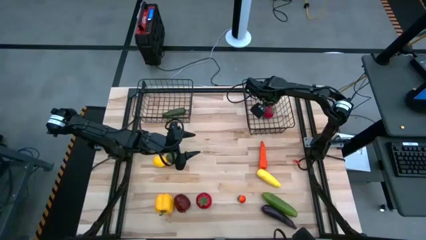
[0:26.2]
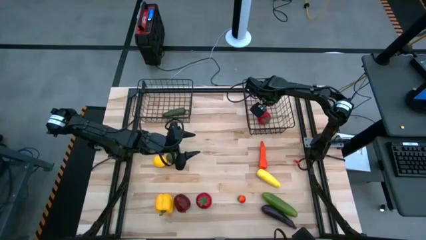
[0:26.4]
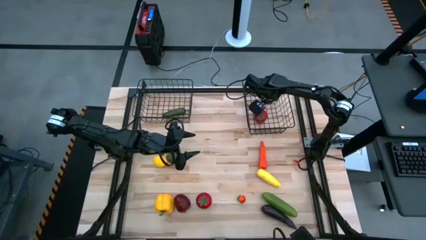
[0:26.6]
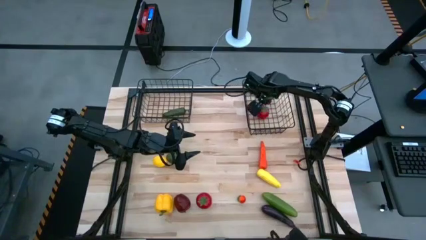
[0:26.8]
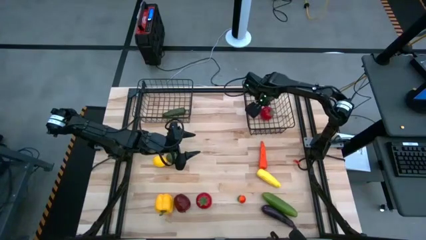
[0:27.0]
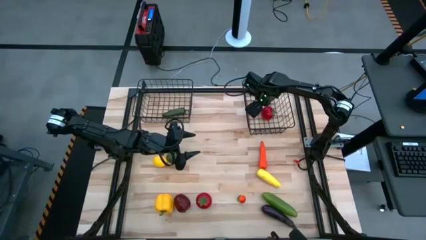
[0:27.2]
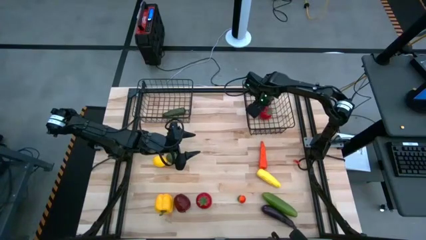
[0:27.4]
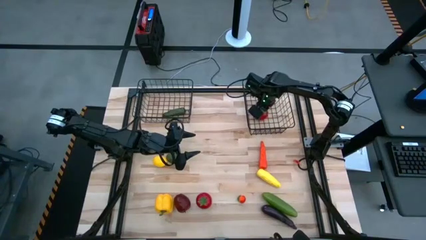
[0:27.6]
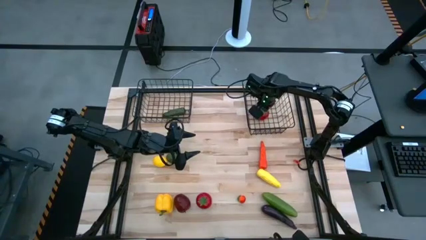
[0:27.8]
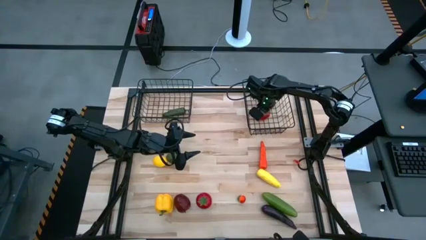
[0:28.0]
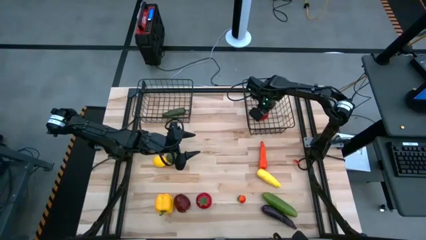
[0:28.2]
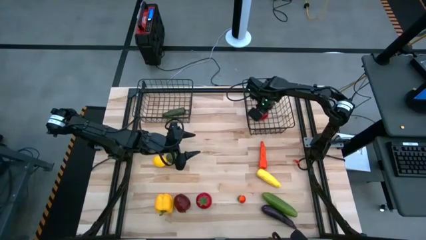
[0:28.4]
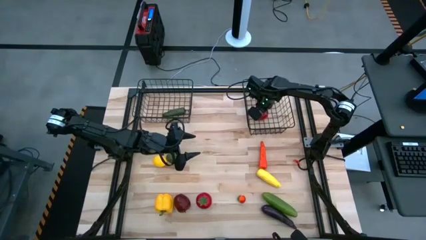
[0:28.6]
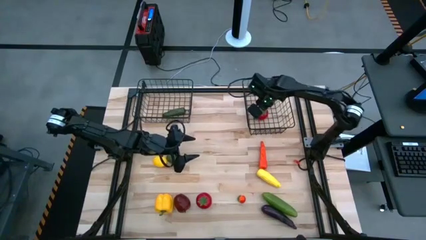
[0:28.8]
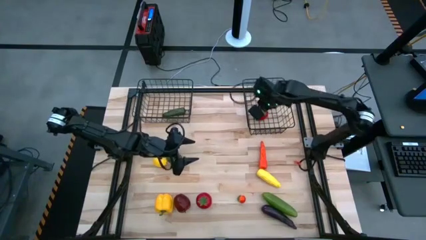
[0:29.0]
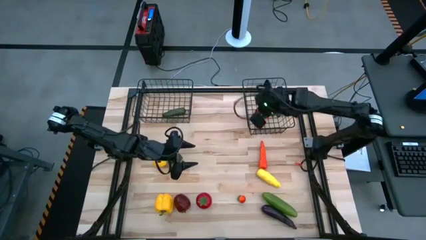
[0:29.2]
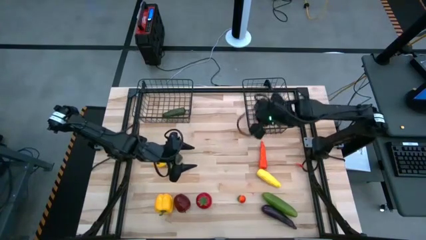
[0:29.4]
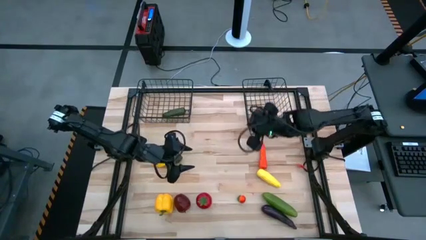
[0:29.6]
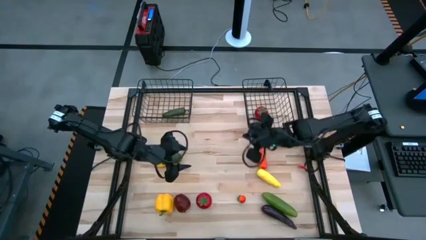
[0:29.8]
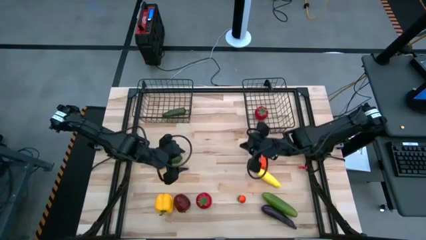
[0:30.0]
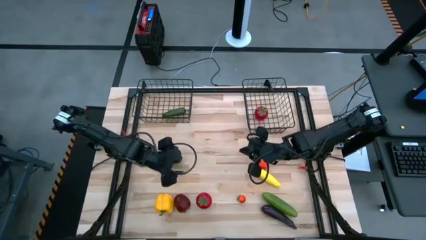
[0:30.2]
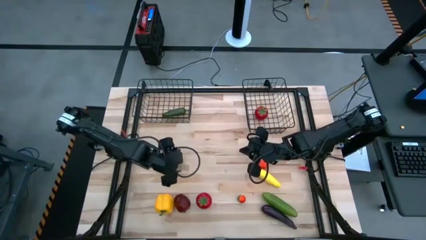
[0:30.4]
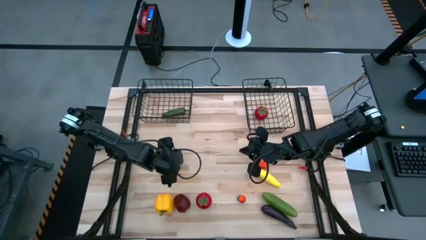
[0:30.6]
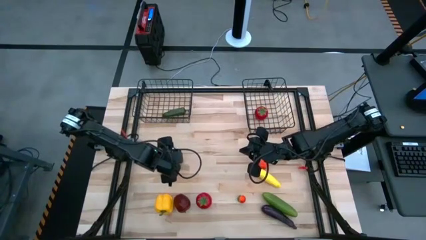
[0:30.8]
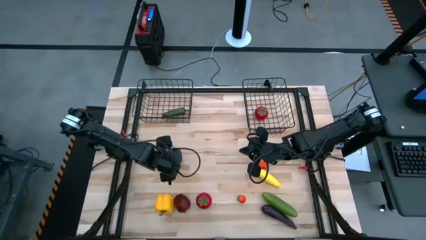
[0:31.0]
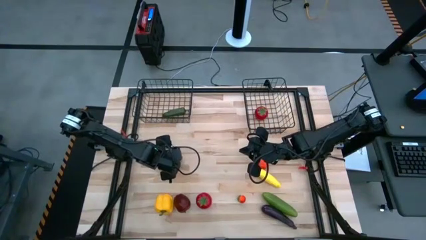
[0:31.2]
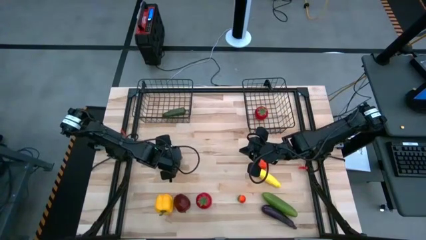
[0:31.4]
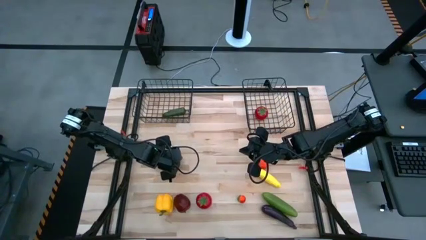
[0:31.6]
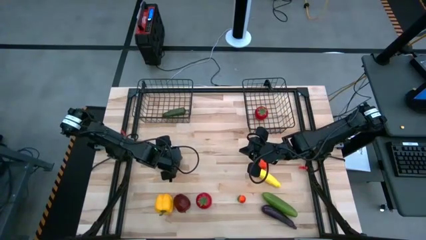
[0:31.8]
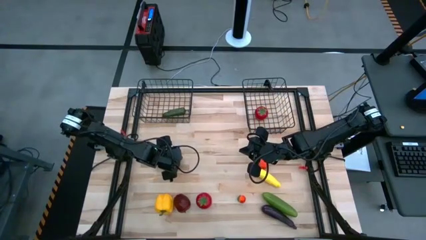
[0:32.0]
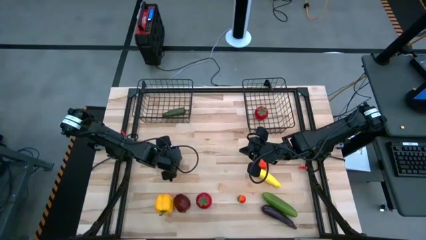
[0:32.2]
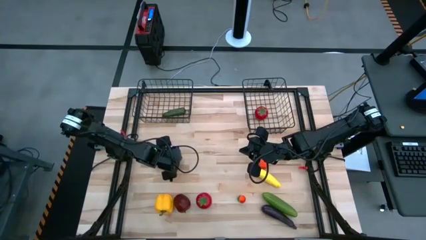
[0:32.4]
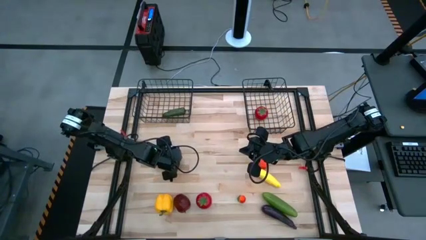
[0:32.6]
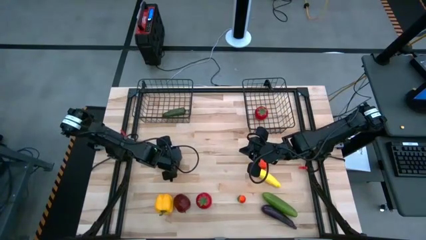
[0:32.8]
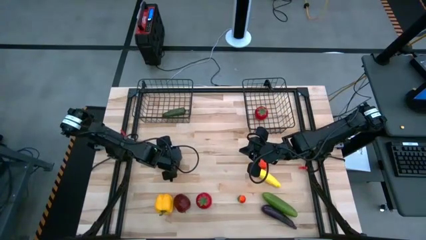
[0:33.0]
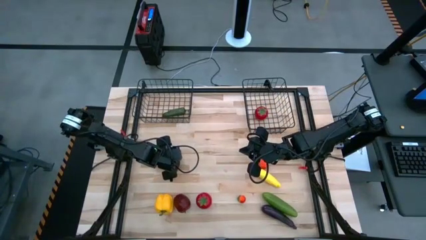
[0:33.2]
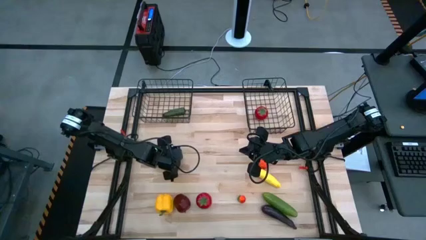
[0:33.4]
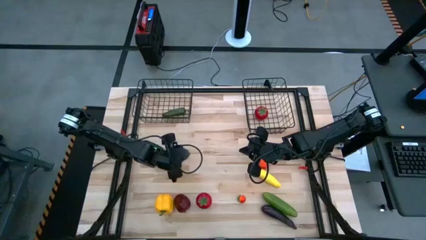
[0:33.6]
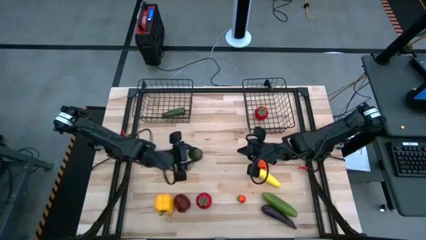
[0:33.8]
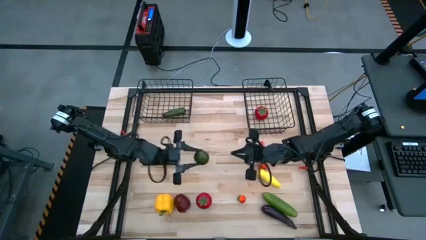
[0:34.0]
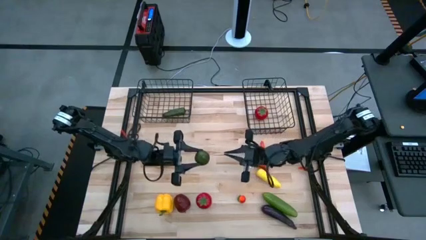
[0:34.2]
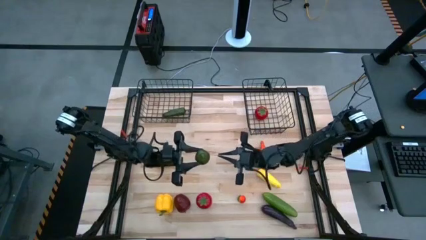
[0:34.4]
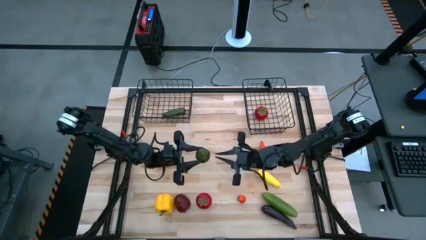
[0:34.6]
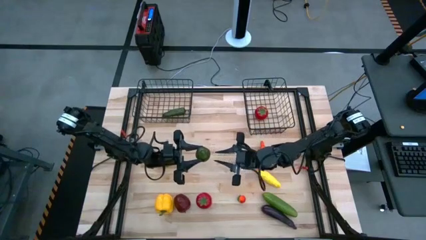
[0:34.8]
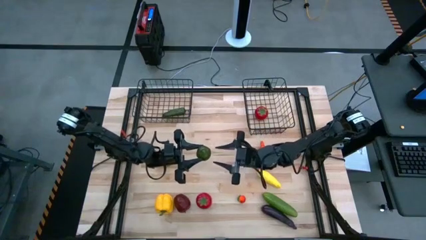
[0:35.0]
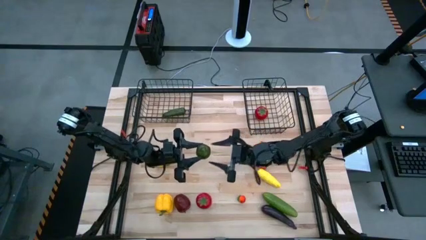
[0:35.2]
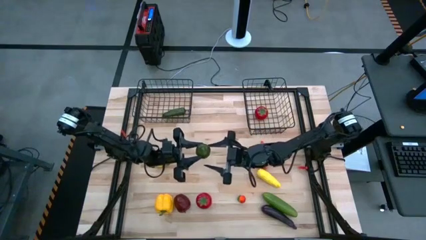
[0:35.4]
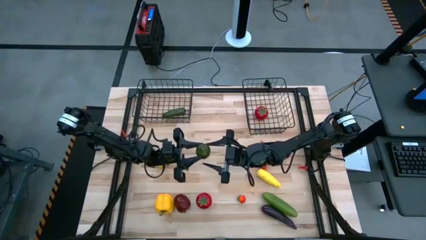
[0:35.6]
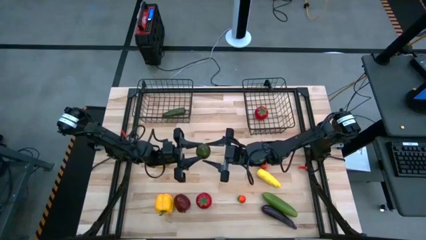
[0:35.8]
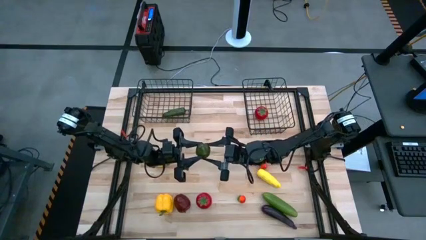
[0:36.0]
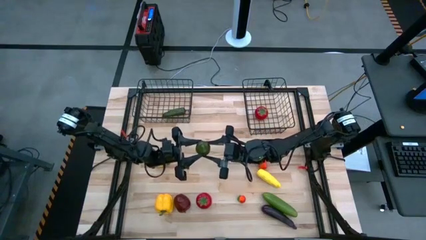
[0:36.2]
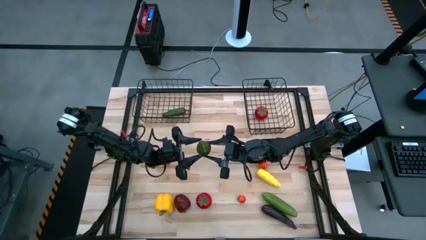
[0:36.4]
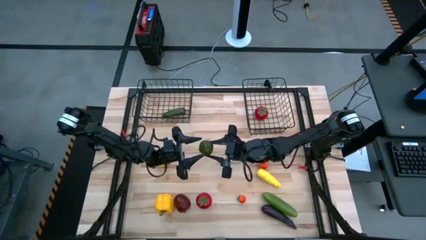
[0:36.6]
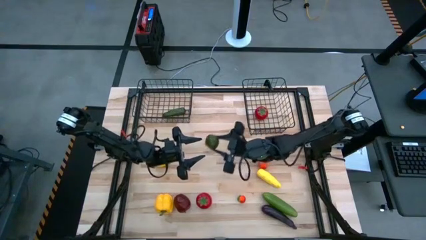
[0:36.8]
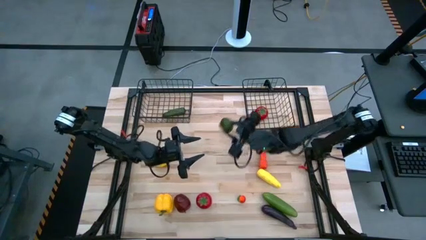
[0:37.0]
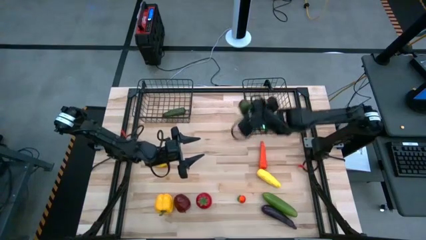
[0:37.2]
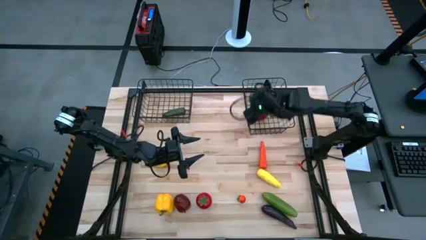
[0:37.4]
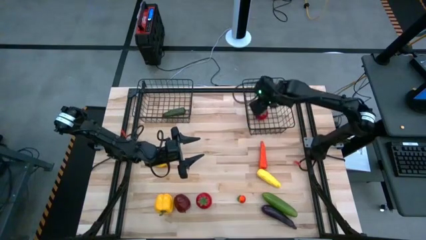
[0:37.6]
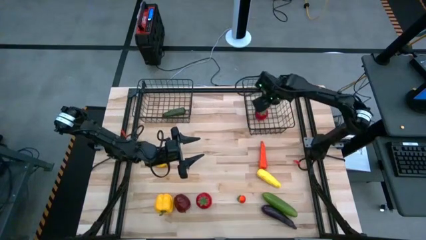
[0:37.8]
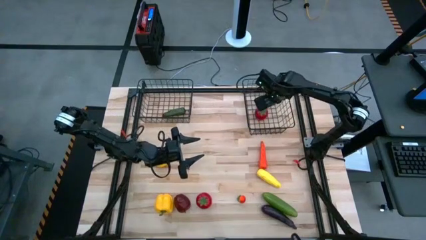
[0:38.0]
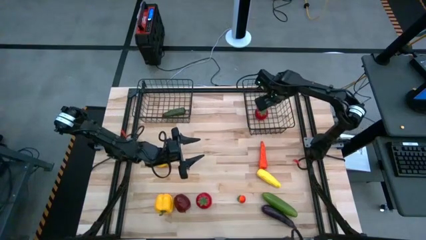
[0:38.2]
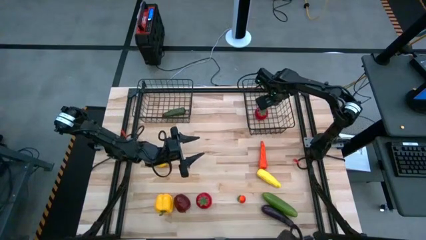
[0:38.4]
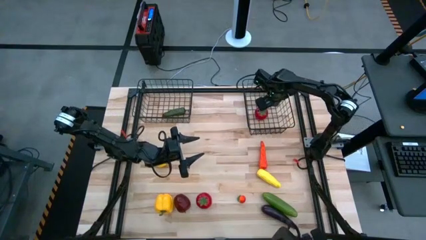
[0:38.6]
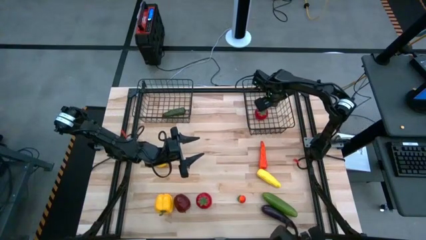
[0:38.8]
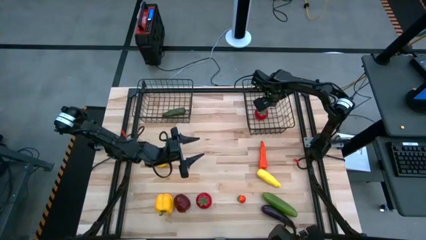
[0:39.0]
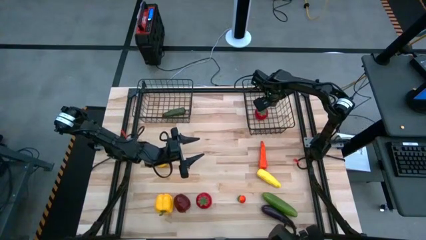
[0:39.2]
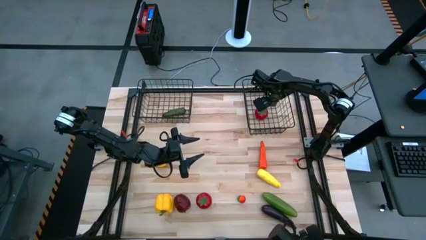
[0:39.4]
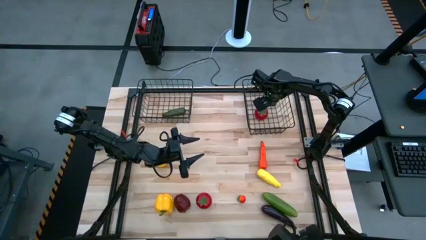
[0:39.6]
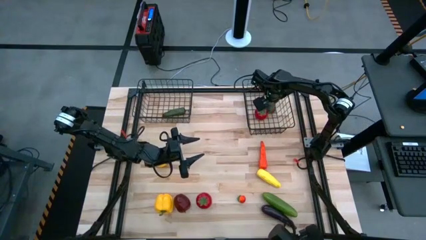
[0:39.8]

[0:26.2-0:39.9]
Task: Sort produce into baskets
Put the green lime into the right black wire basket
